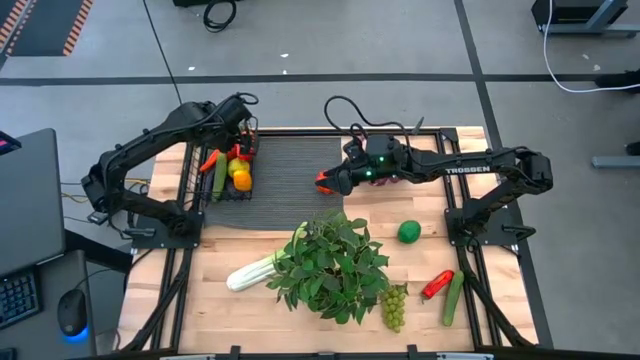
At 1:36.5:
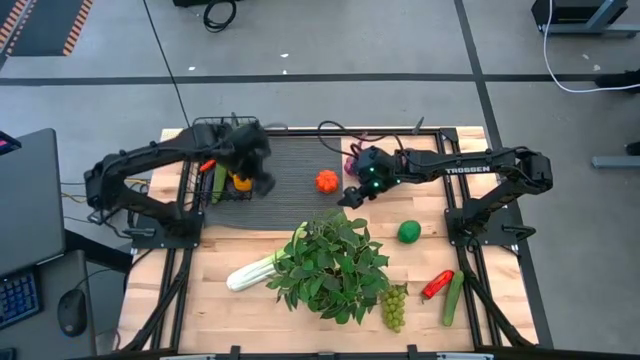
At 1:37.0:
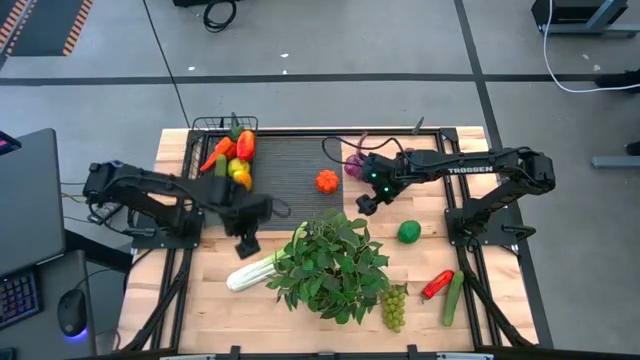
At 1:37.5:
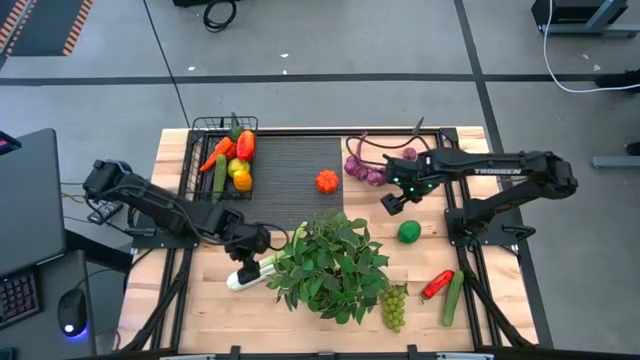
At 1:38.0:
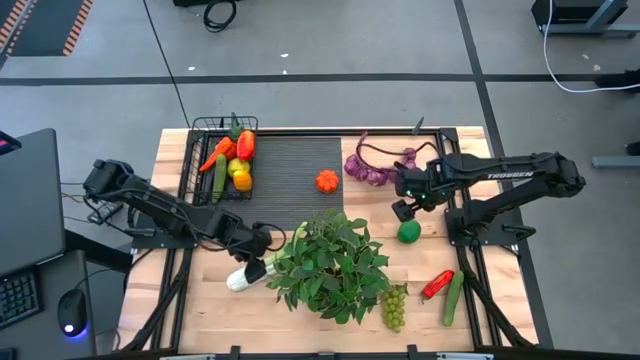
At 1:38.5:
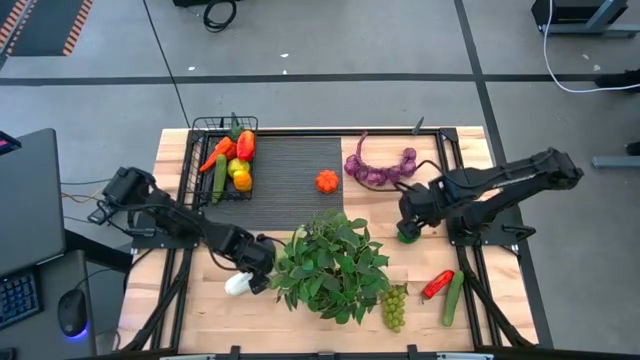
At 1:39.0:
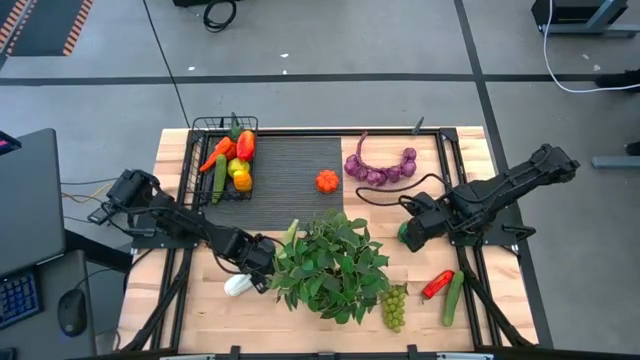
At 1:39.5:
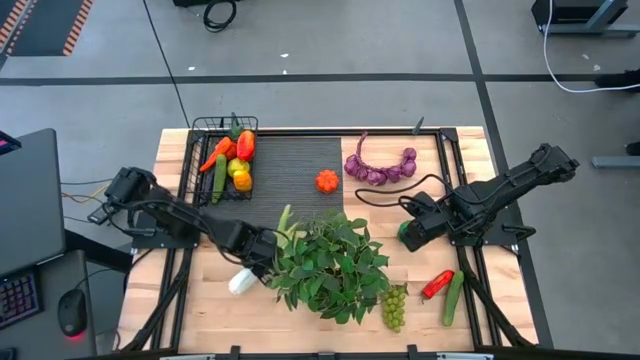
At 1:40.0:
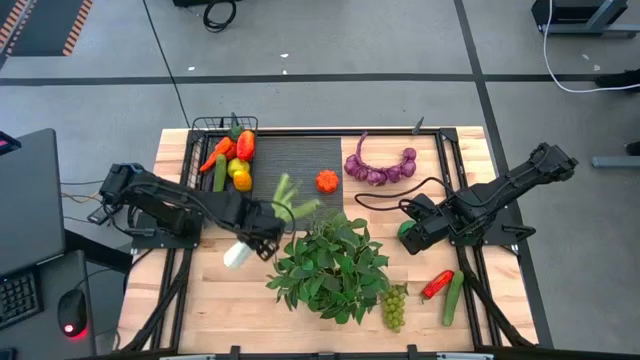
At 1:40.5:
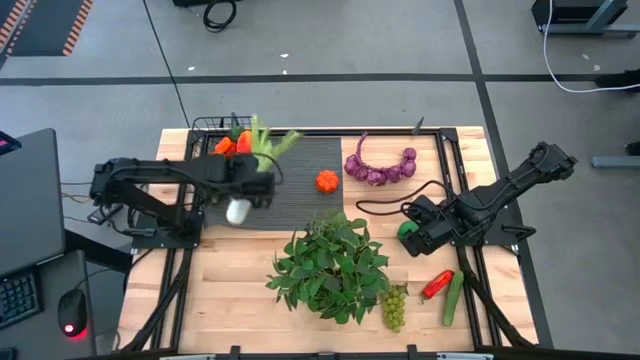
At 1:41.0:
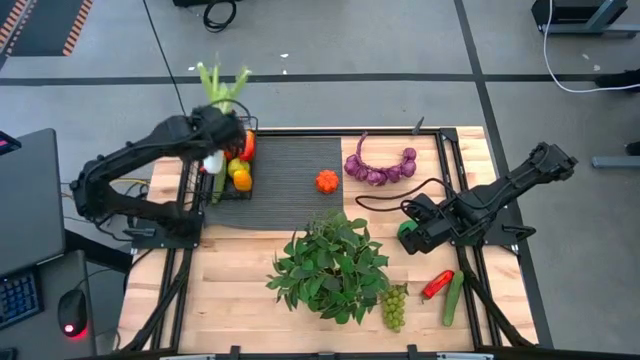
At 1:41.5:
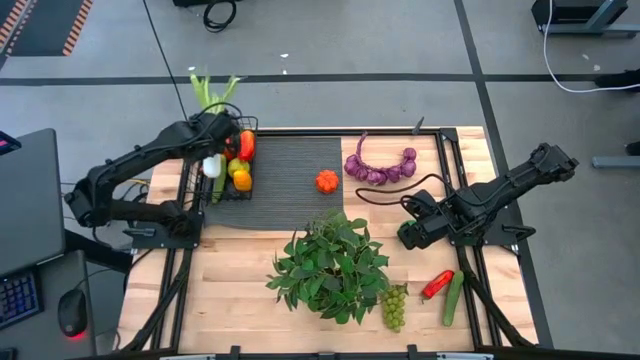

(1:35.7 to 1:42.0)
Task: Build produce basket
Put the green celery into the wire basket

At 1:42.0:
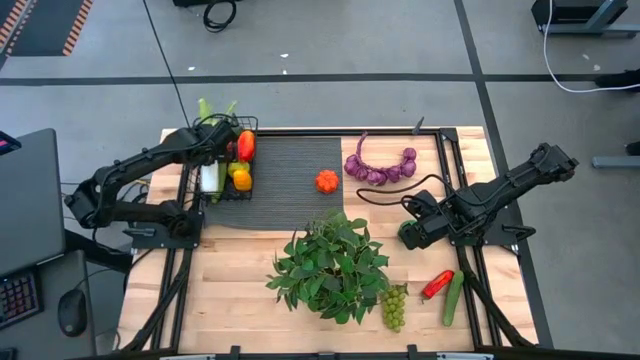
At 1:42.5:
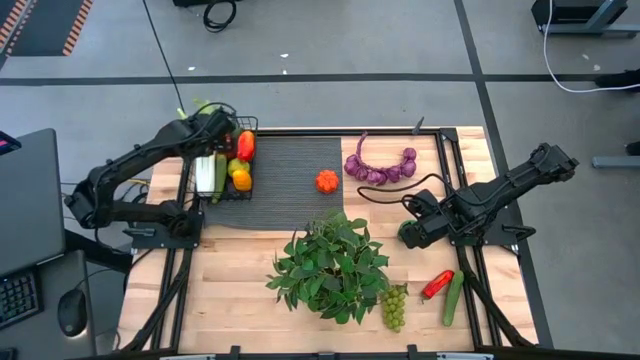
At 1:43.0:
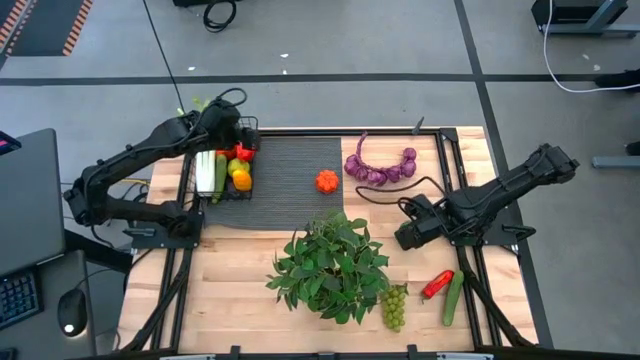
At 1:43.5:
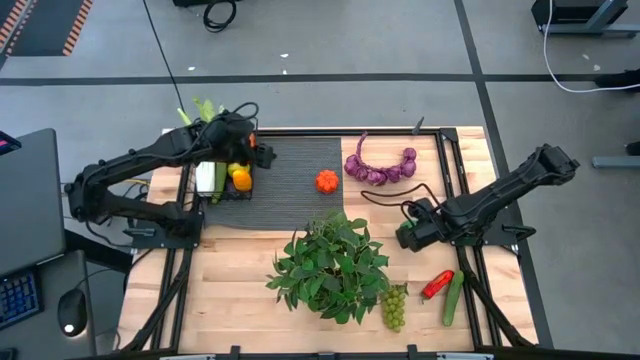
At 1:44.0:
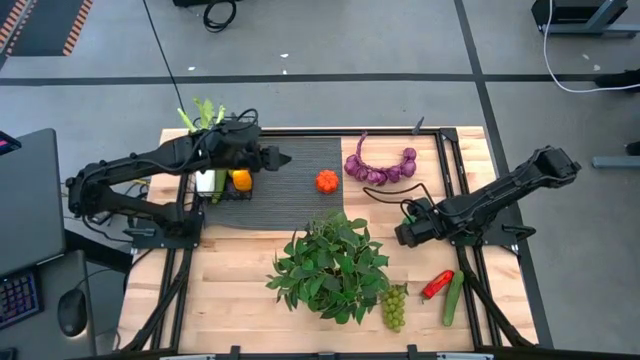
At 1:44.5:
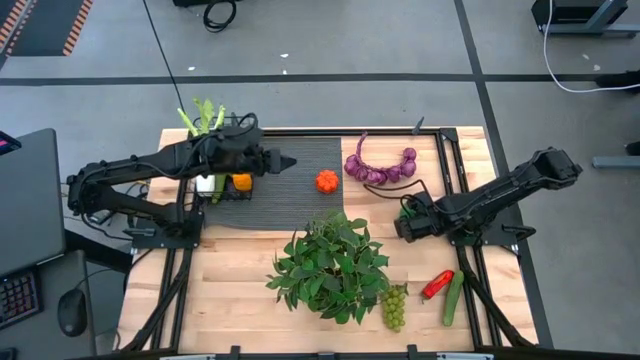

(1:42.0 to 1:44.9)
Put the green lime into the wire basket

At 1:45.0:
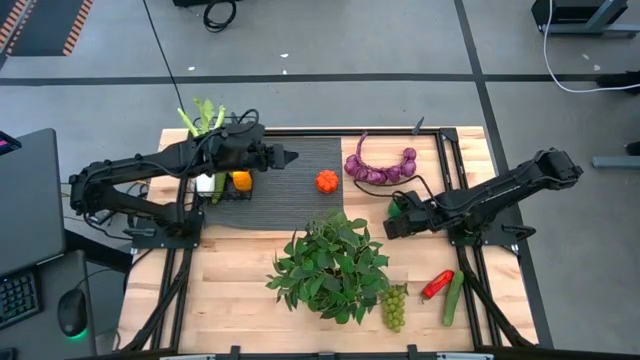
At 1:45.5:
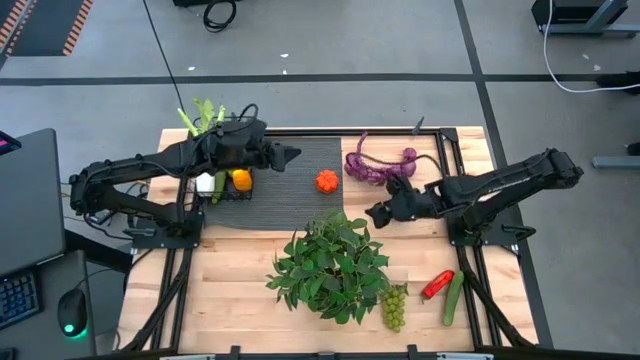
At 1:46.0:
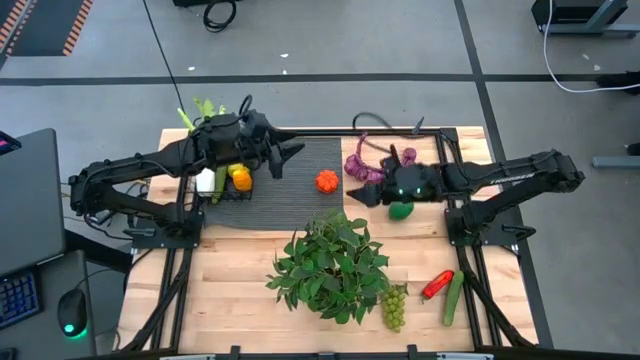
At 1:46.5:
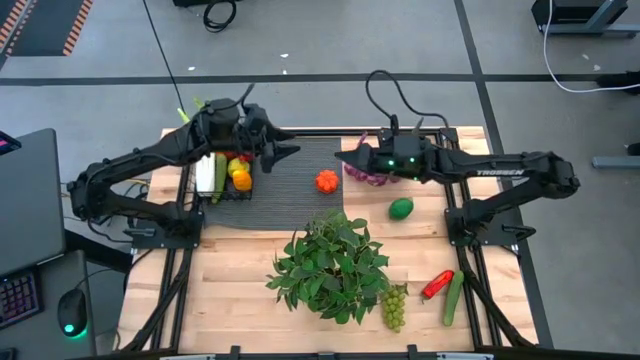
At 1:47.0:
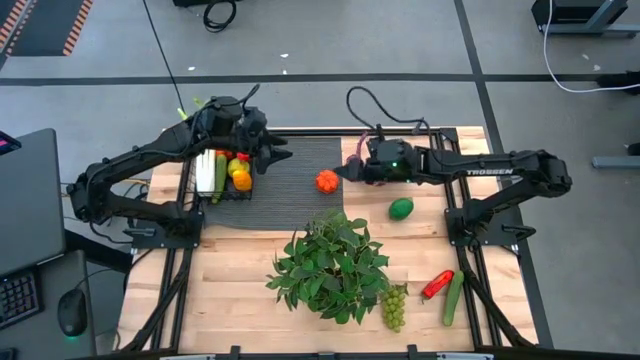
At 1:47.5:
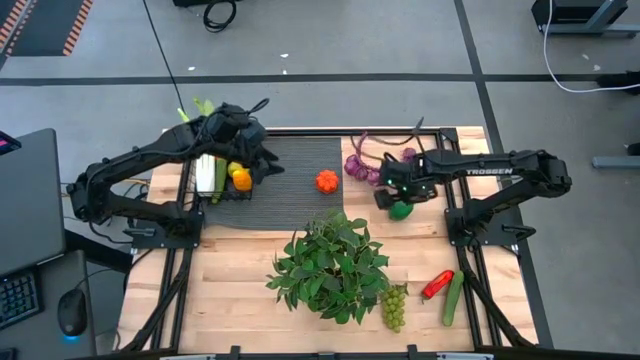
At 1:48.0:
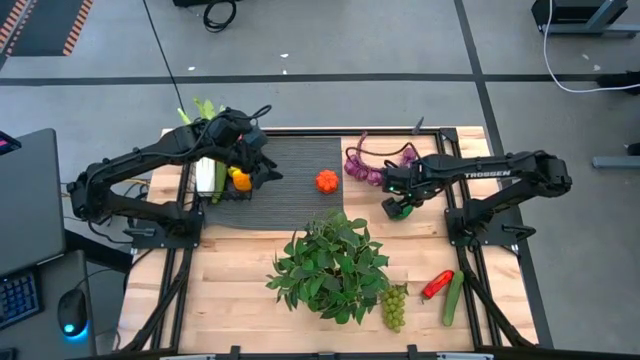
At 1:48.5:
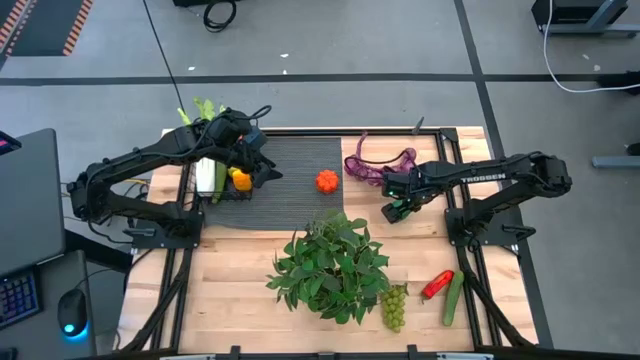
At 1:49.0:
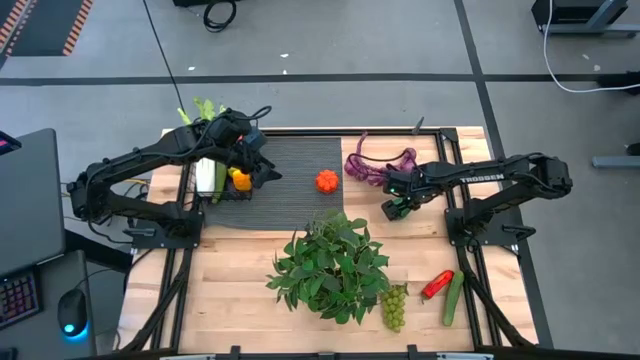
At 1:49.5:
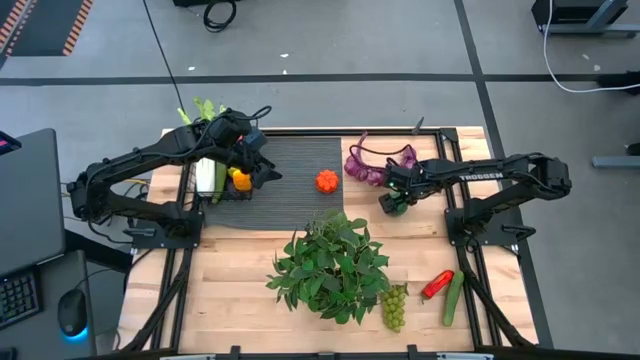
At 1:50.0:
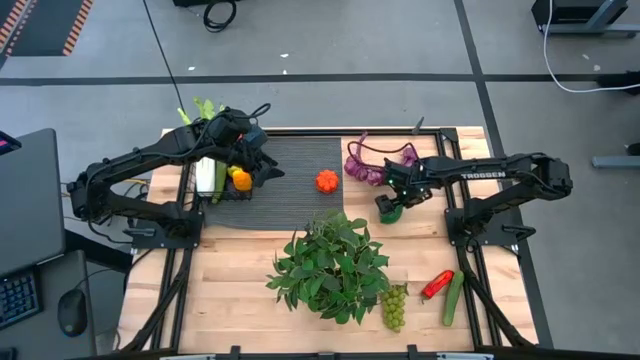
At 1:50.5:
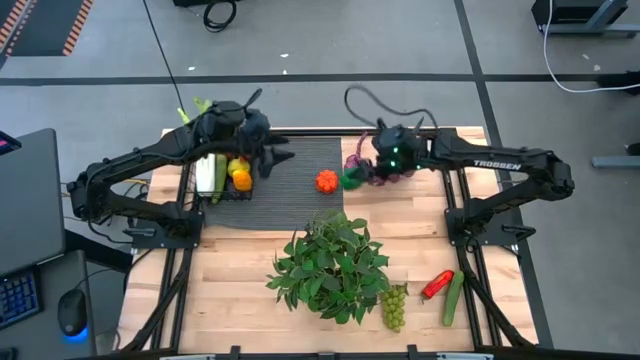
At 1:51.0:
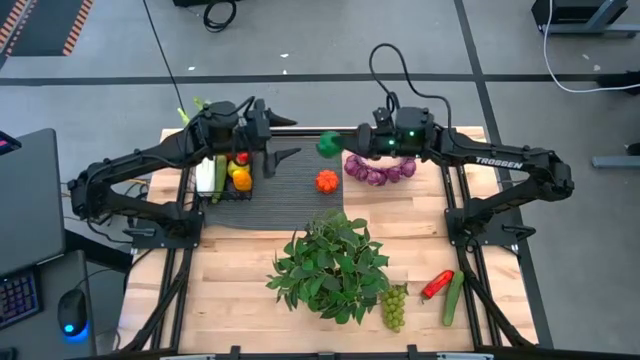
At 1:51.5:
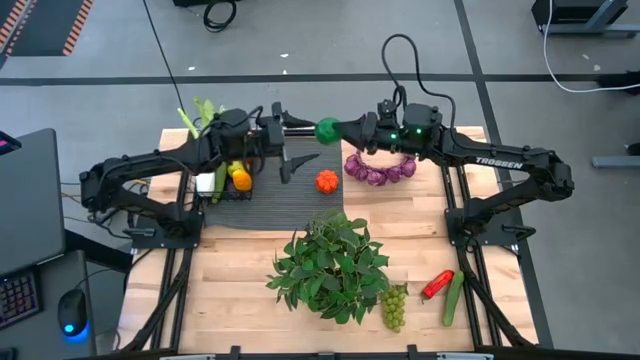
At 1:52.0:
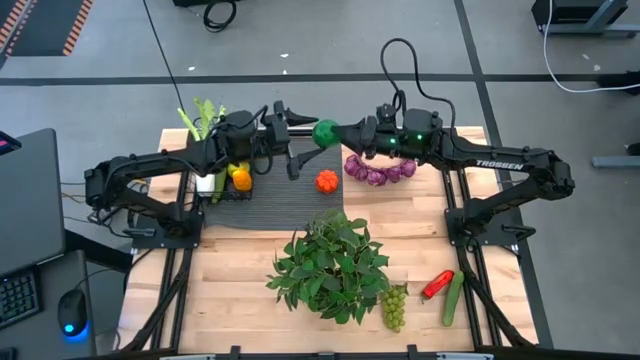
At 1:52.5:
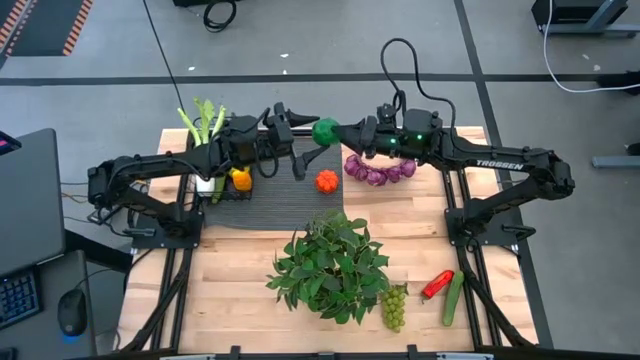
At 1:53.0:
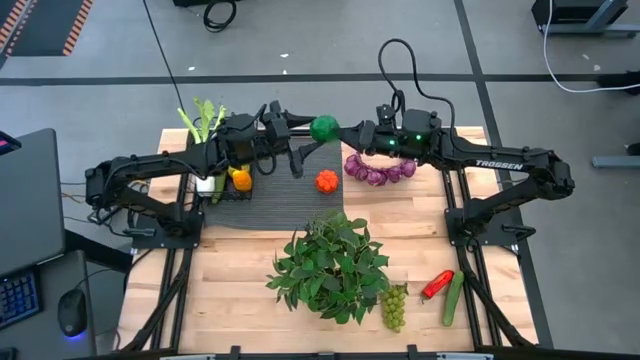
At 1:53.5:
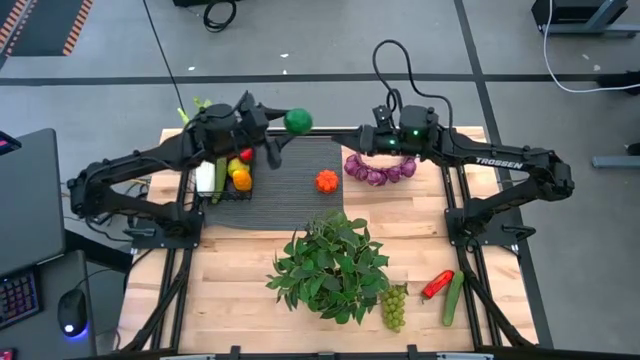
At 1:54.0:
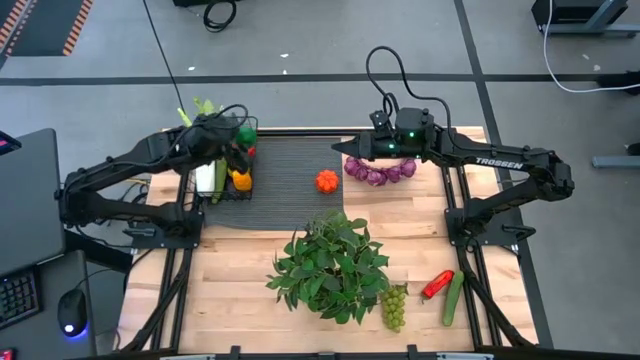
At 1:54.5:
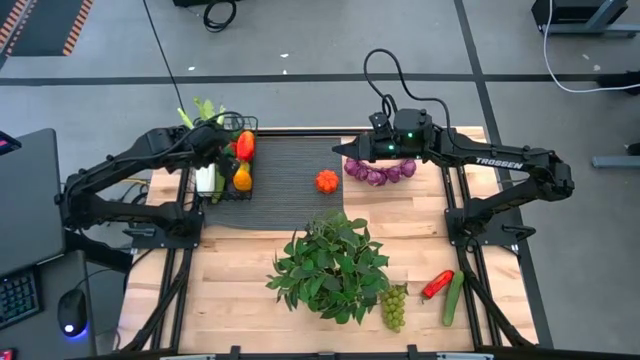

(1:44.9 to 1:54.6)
Put the green lime into the wire basket
